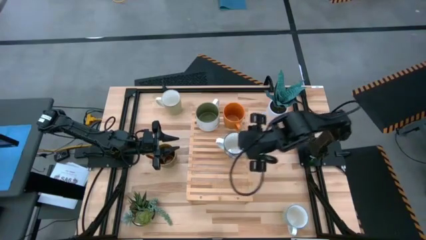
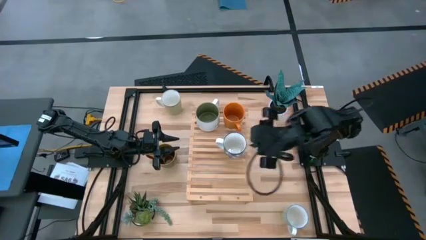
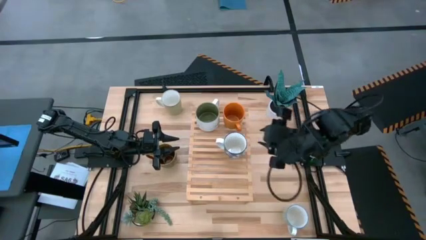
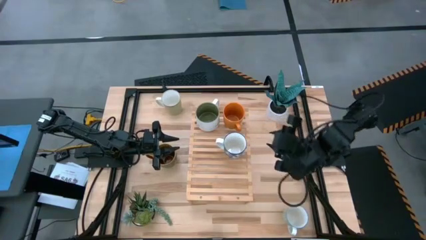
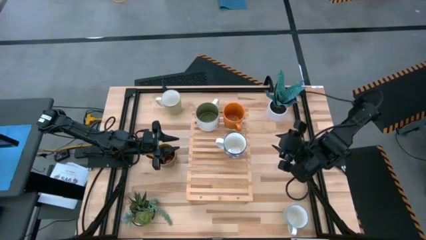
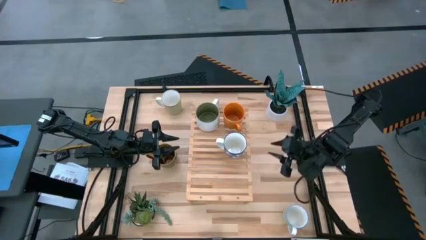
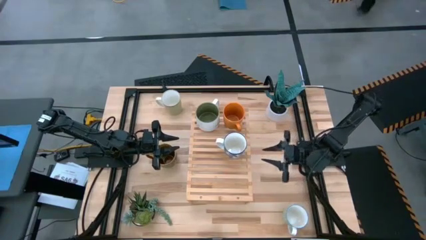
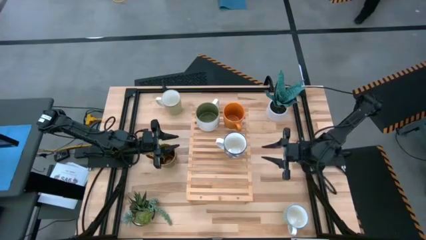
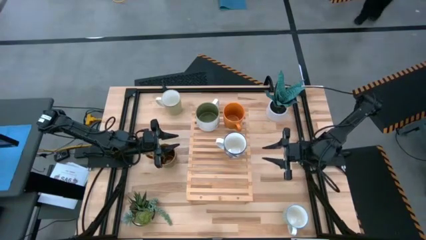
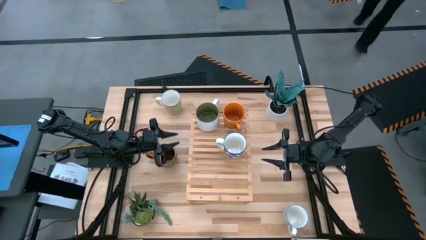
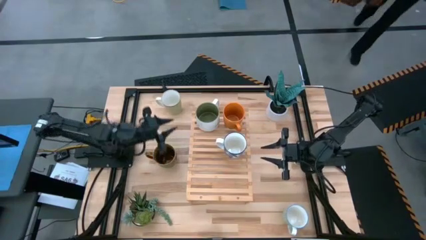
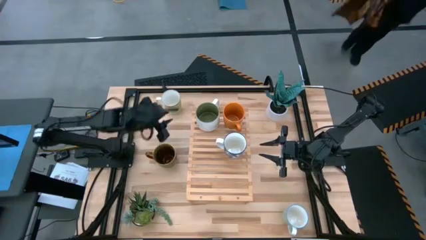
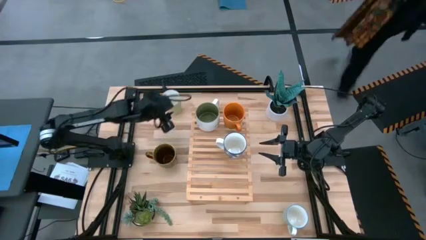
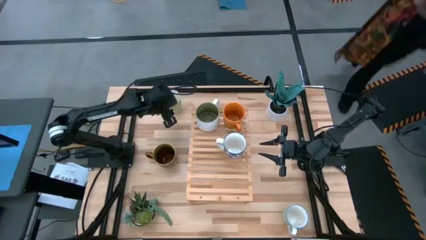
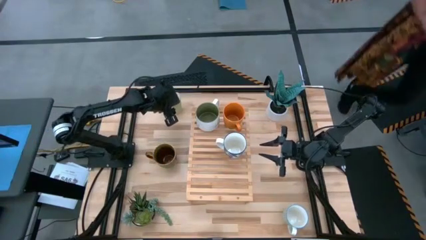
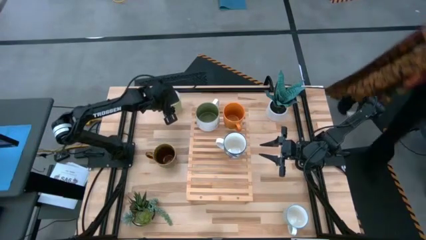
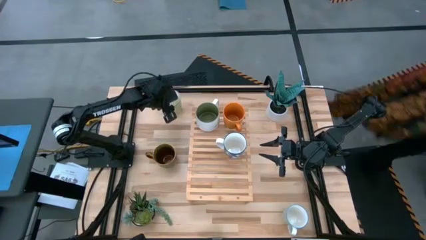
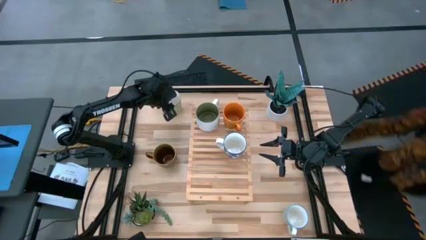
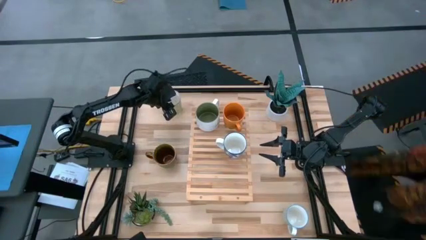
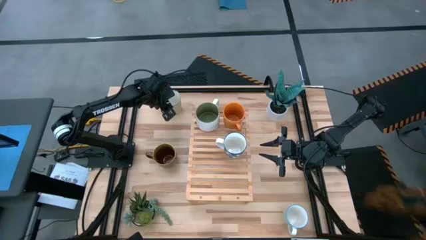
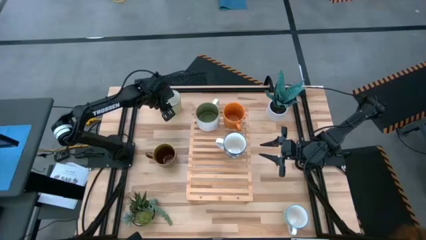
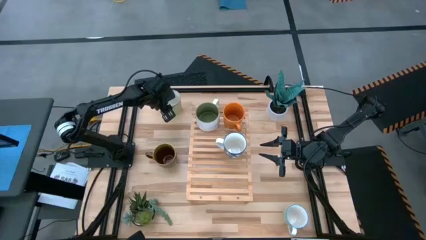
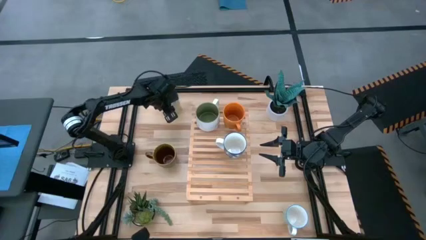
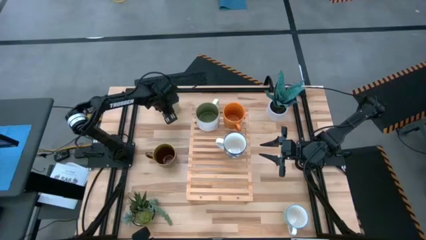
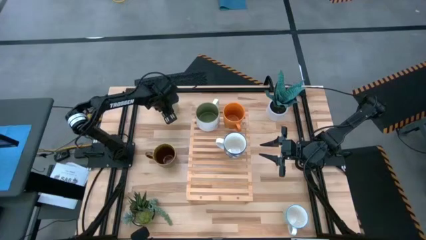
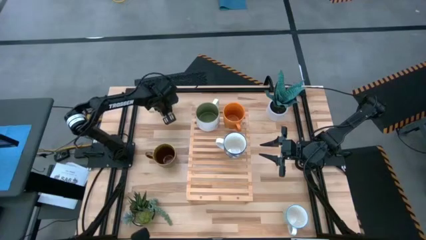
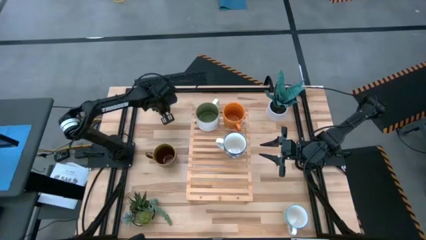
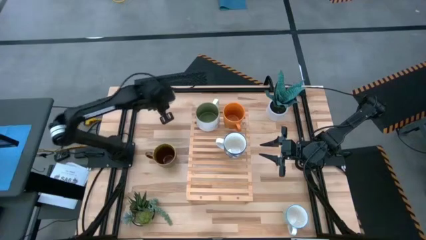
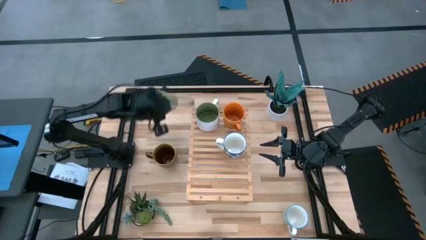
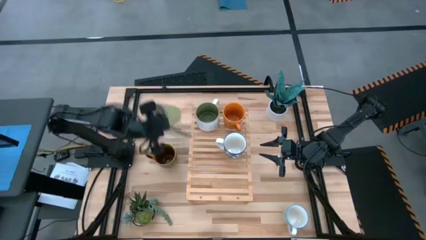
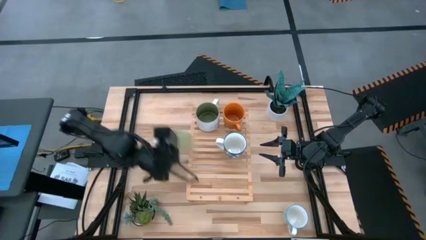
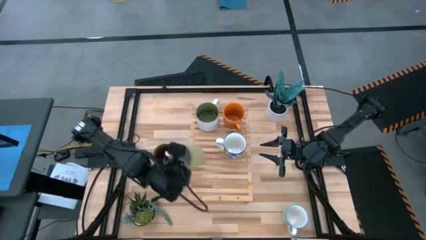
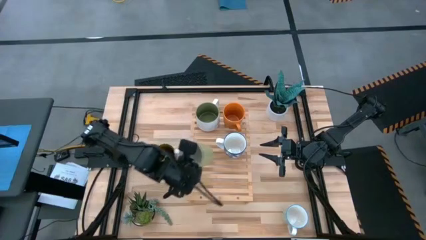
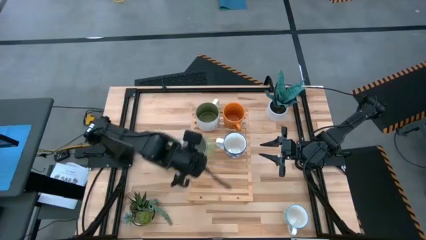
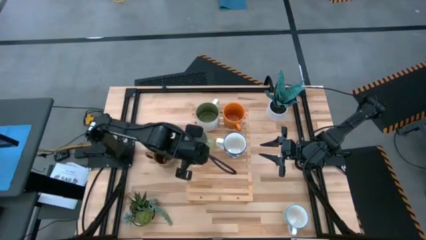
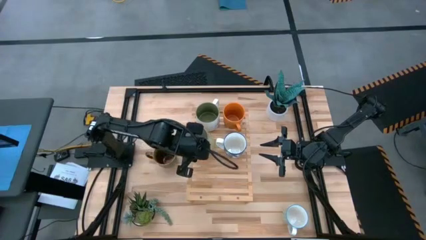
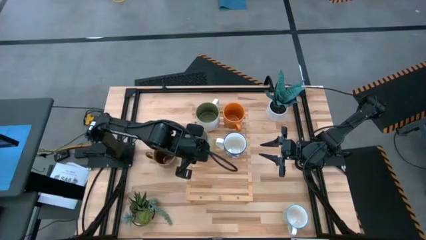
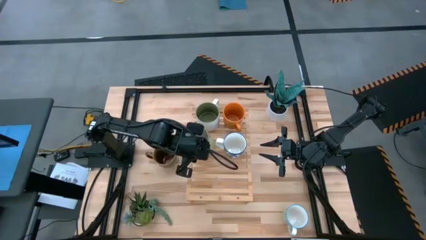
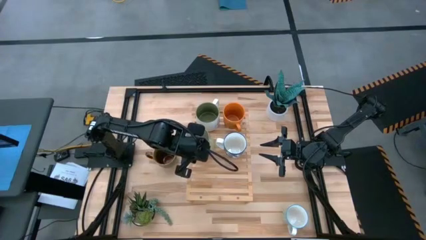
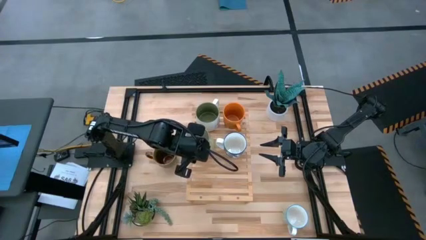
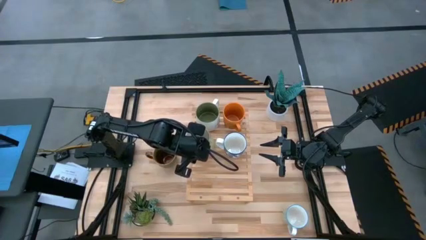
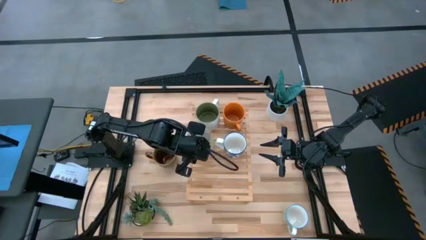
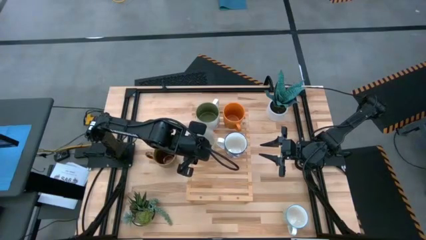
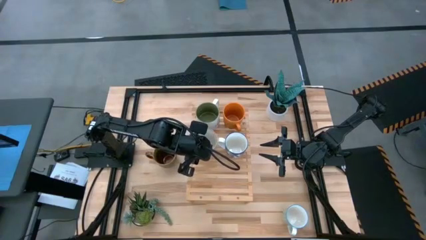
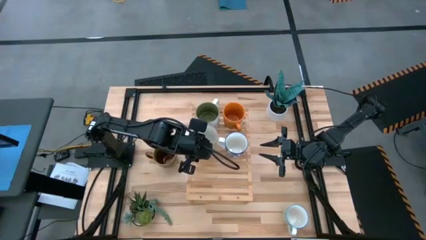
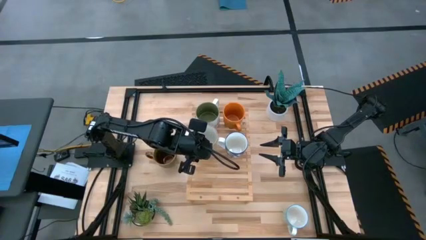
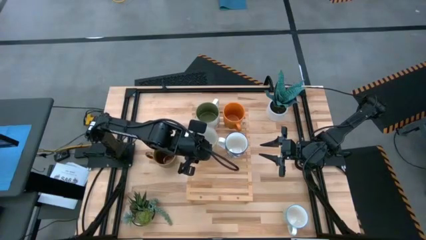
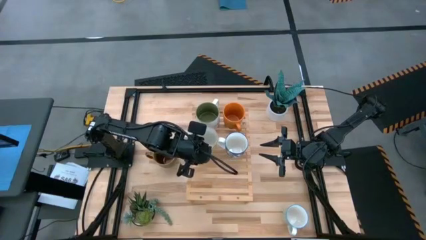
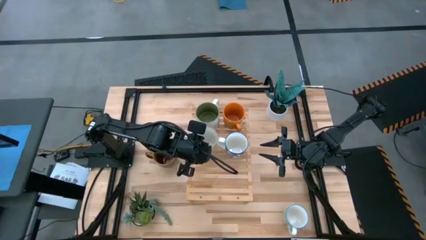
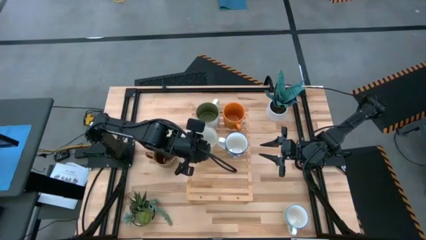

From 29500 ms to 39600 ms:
Task: Place coffee mugs
Put the light green mug on the shelf

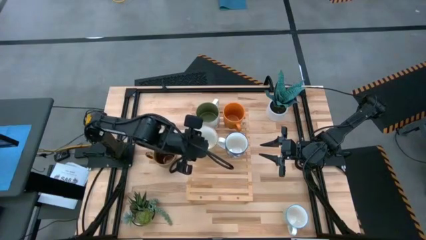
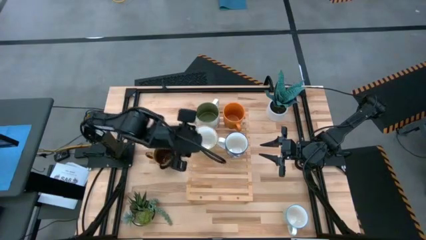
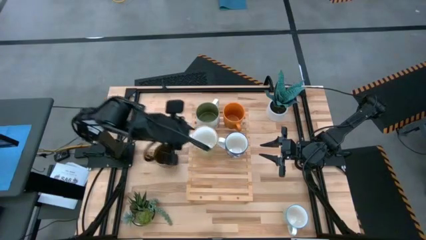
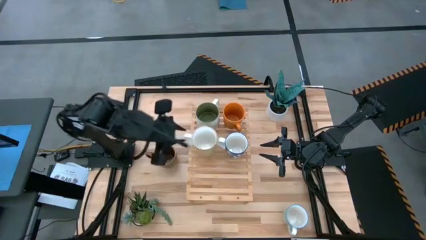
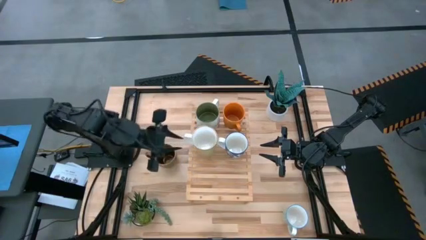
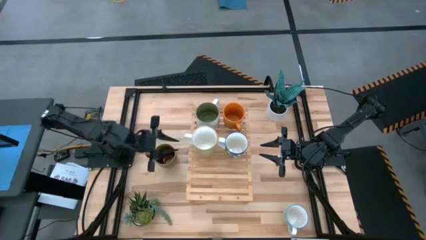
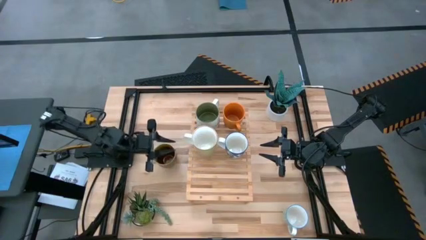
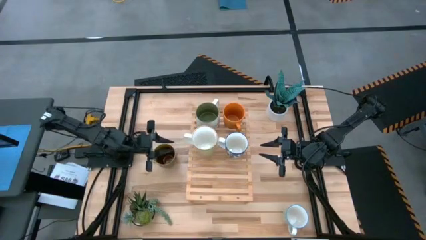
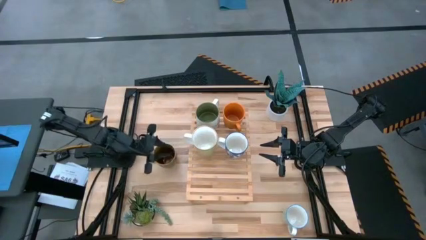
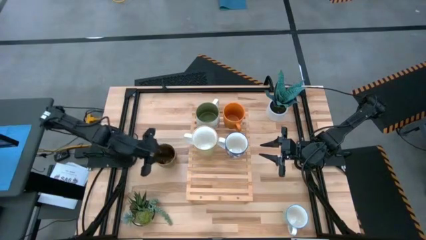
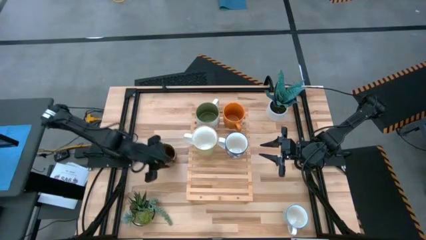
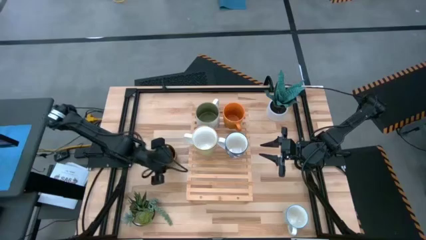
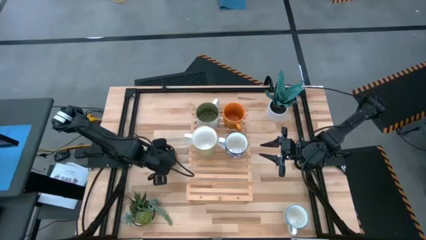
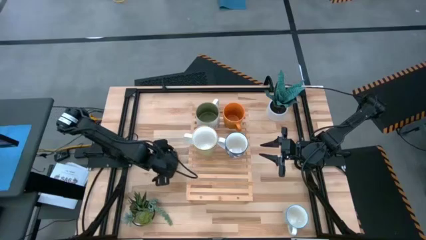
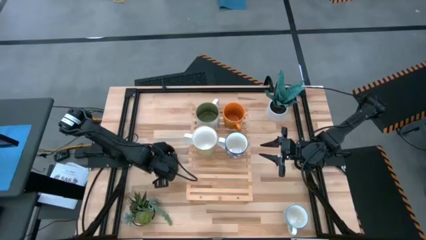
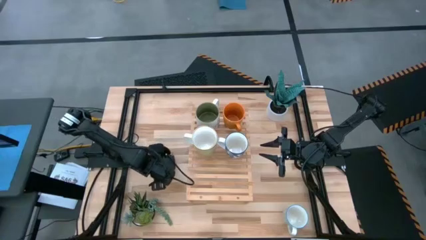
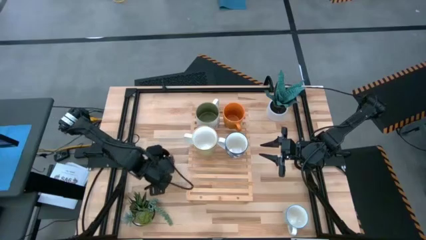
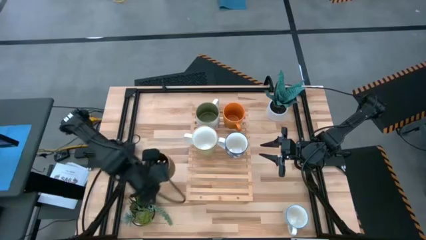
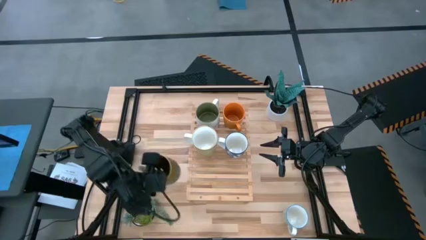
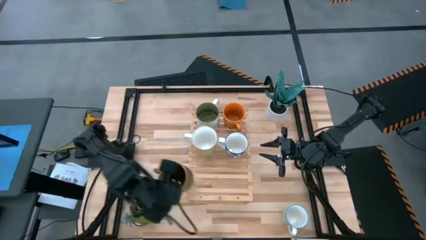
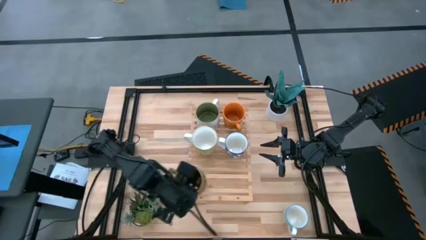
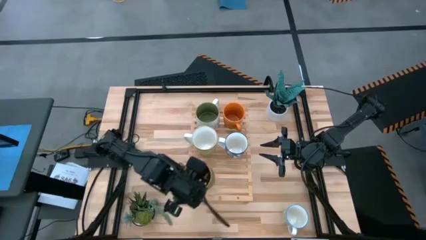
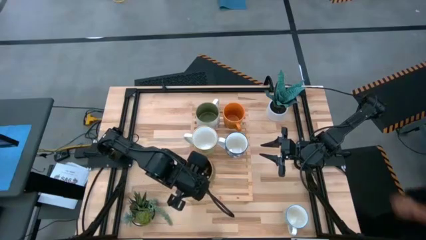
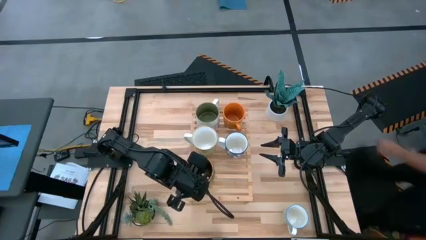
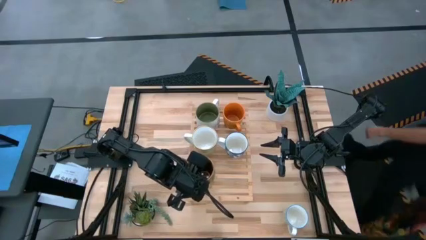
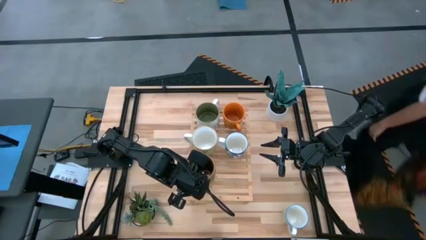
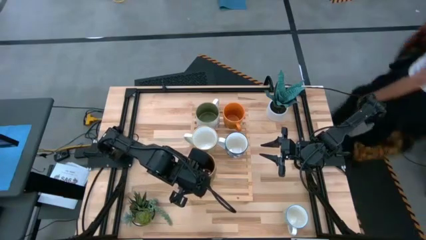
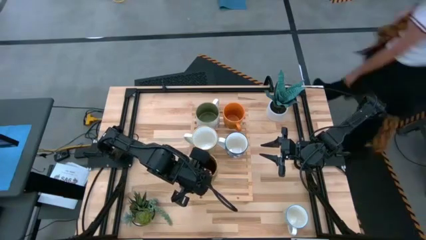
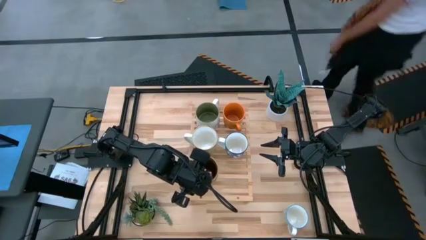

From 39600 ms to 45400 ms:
Put the brown mug on the shelf
